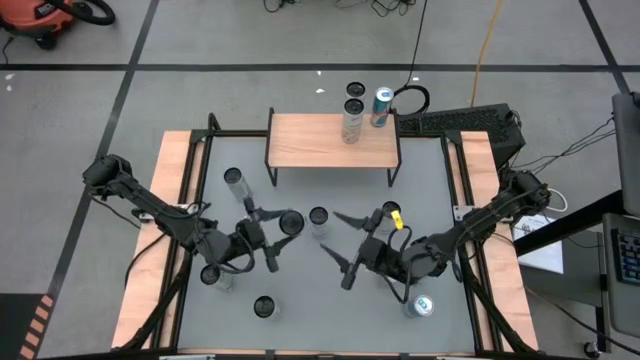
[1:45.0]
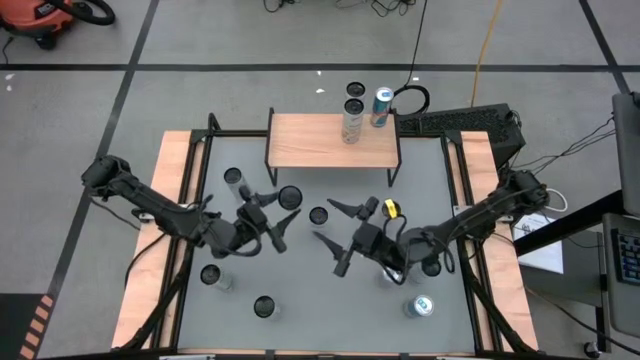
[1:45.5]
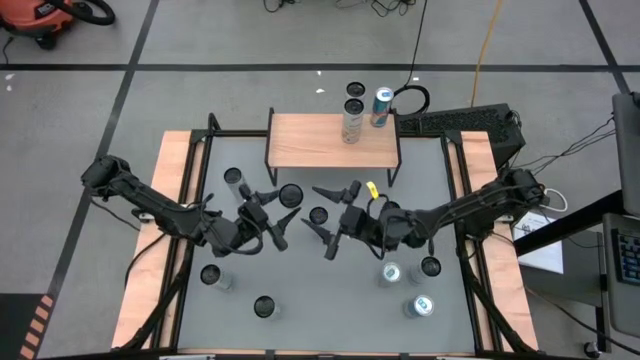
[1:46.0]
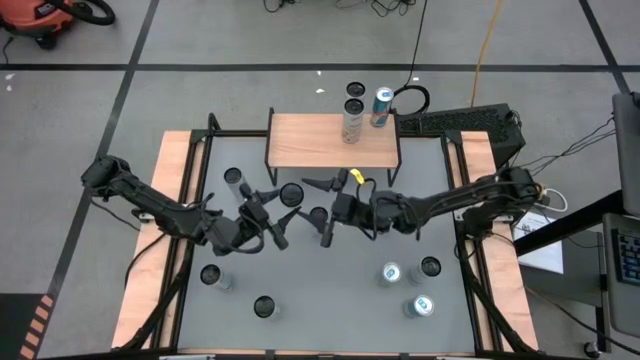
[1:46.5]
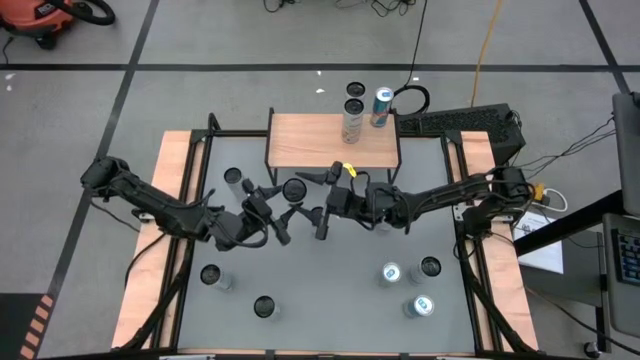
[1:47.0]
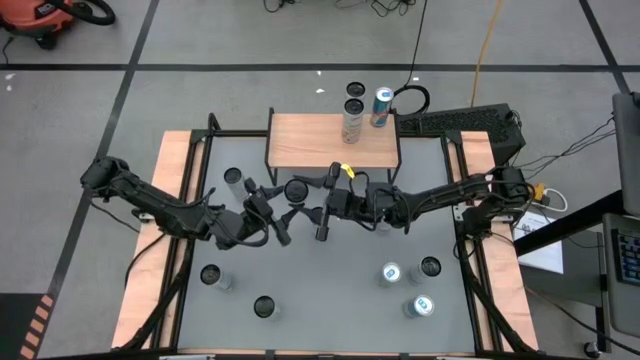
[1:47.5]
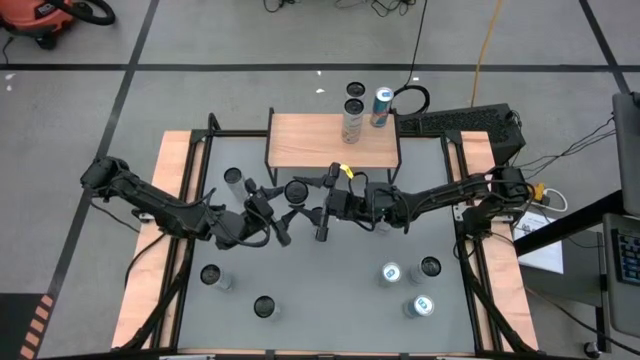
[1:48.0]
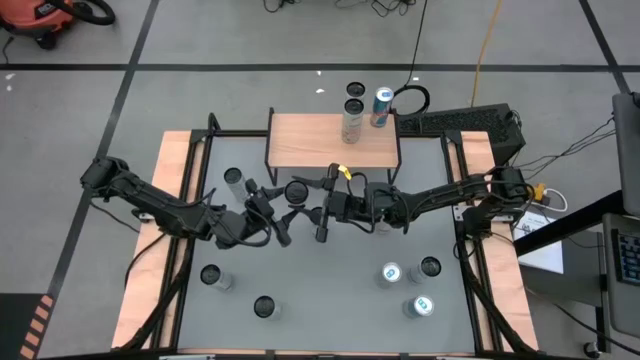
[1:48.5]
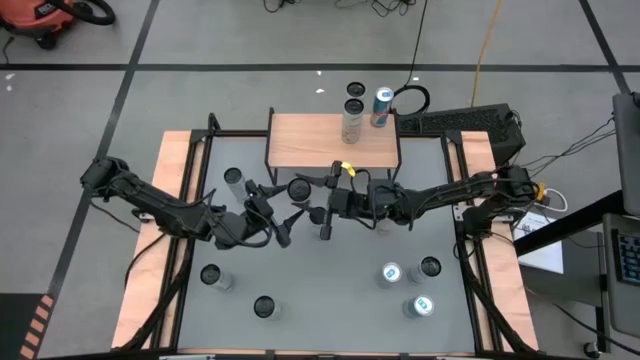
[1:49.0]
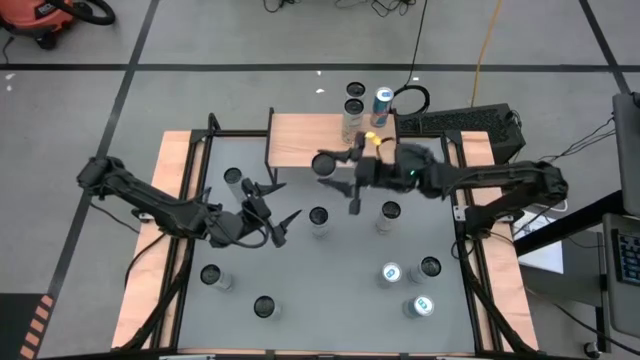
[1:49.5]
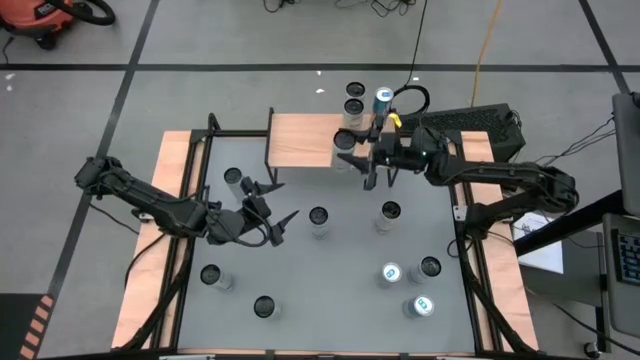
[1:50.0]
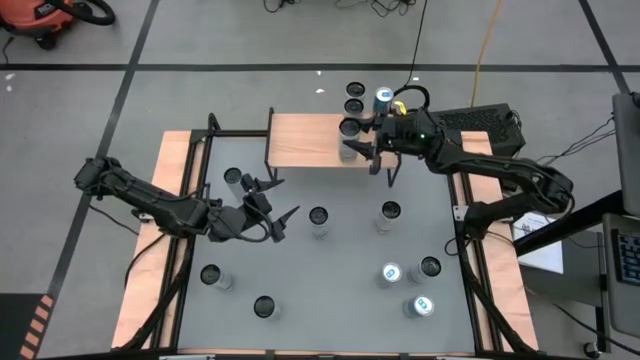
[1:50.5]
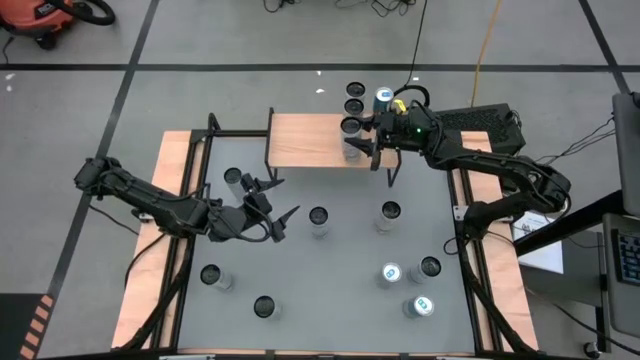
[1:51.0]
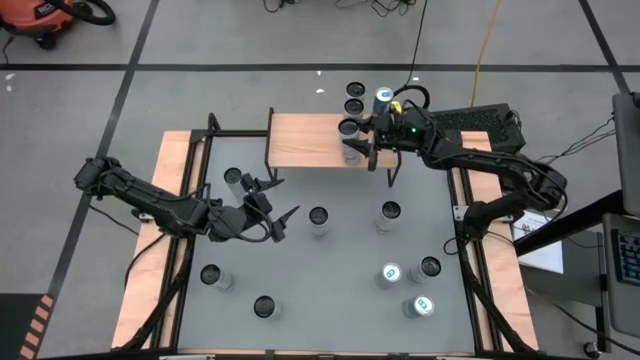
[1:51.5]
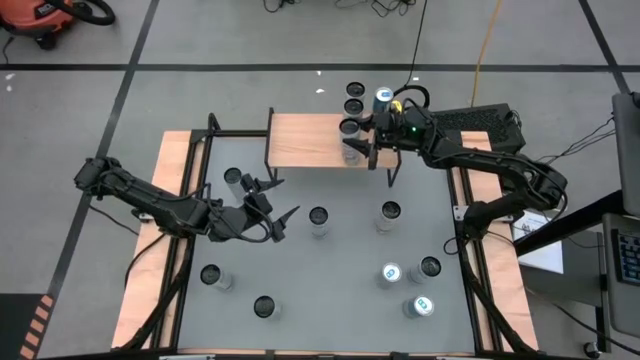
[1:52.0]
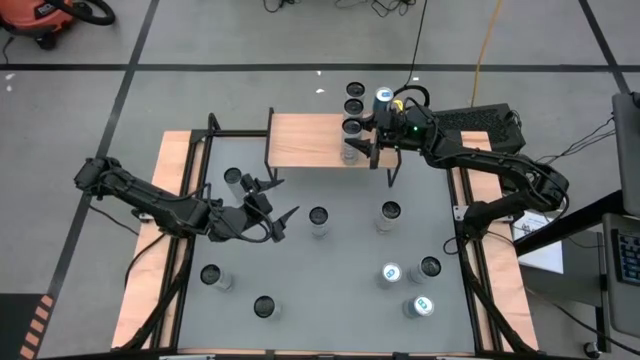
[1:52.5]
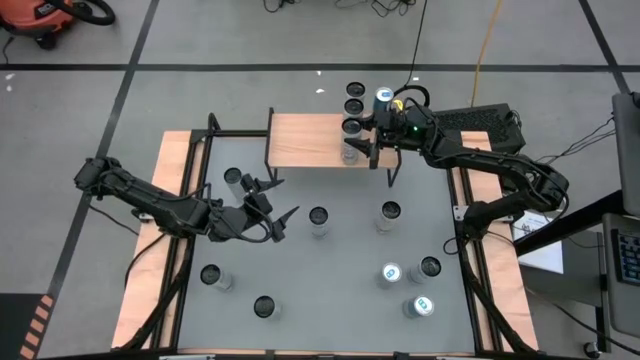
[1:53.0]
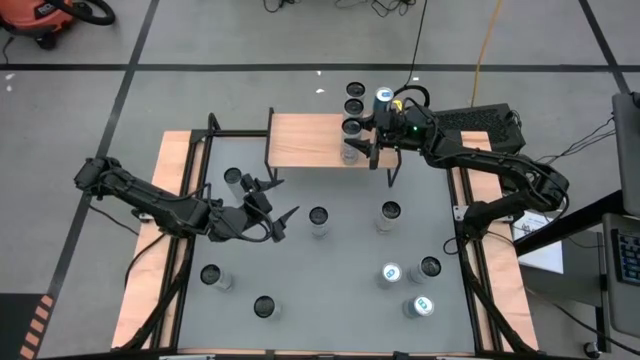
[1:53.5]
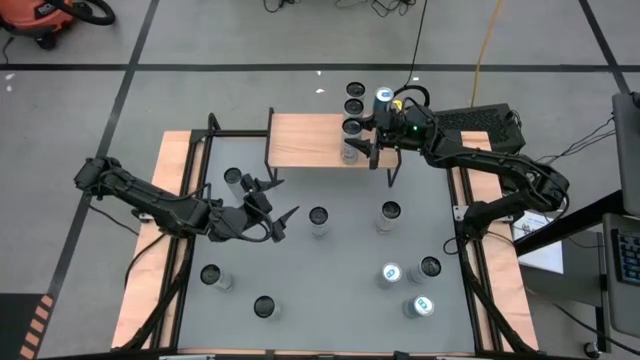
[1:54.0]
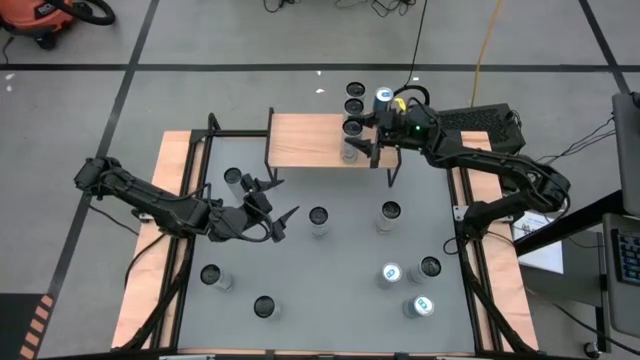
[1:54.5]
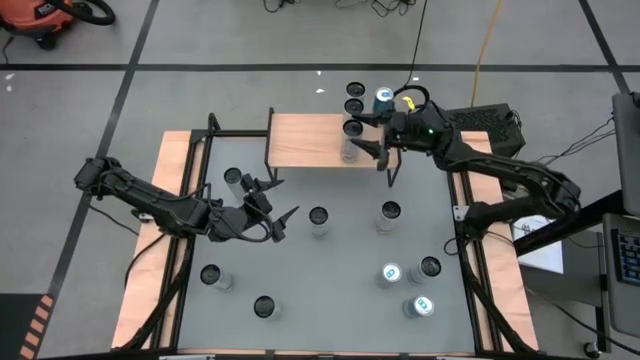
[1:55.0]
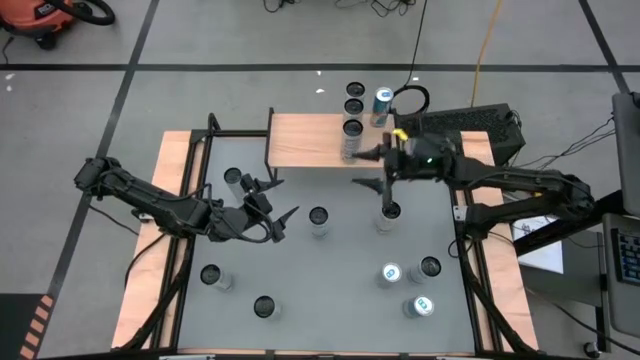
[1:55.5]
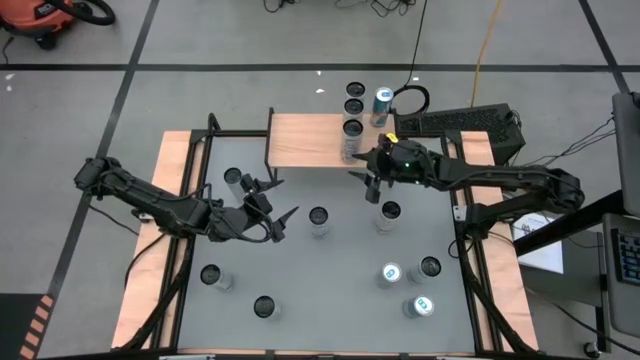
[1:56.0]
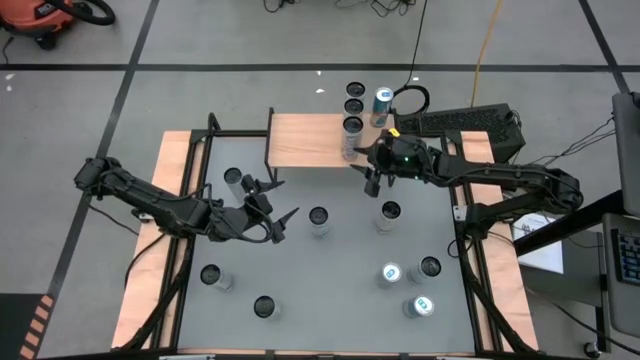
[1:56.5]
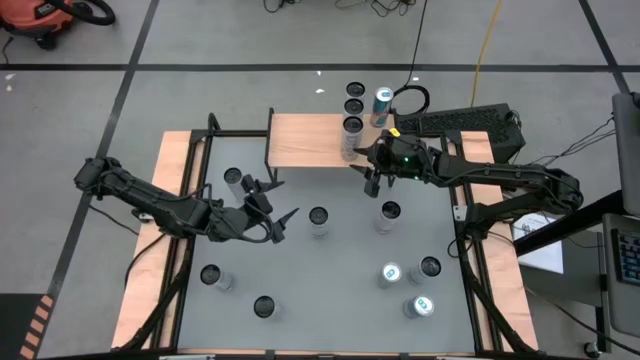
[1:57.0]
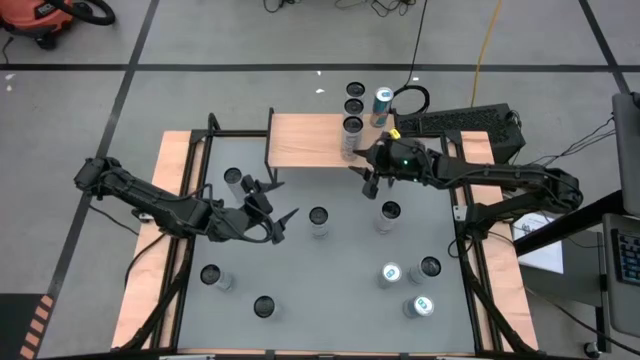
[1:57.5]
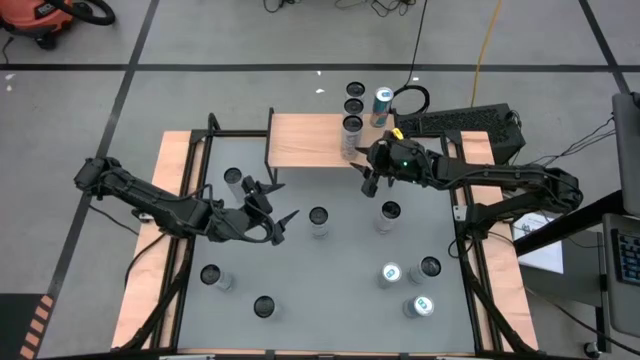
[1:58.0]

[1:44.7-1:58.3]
Task: Place canned beverage on shelf
Put the white yellow soda can on the shelf aligned with the other white yellow soda cans

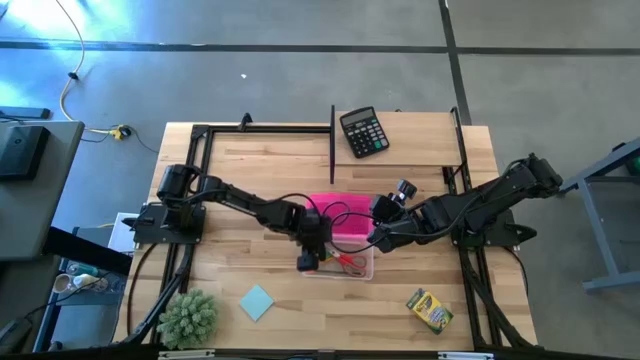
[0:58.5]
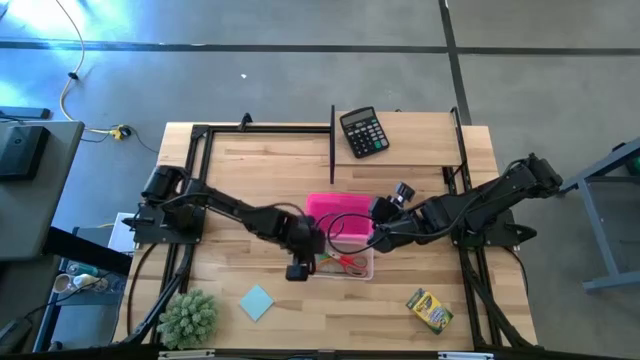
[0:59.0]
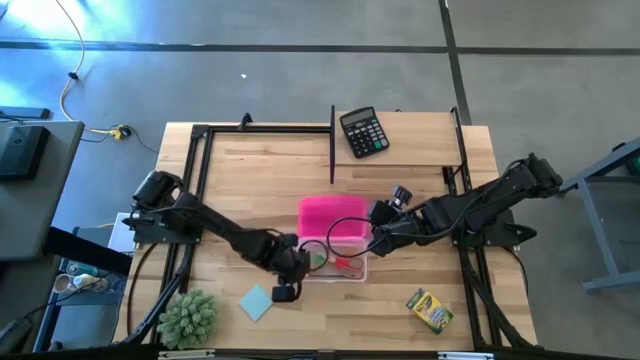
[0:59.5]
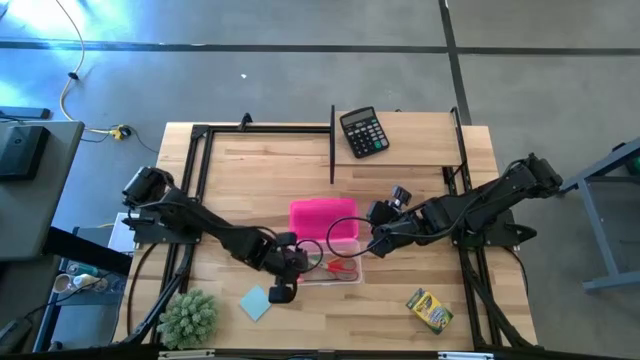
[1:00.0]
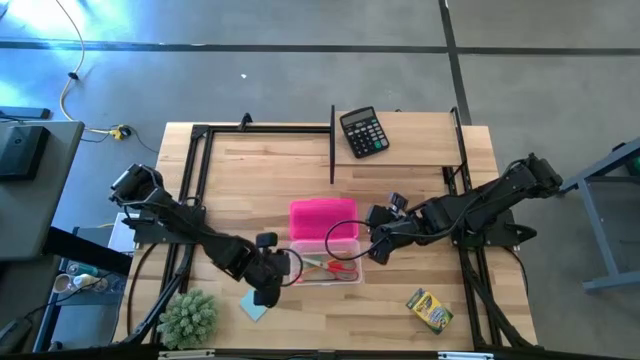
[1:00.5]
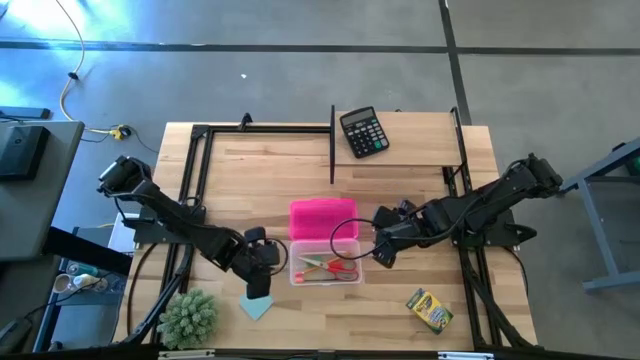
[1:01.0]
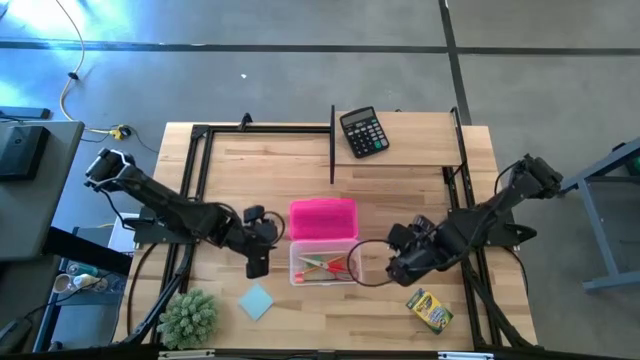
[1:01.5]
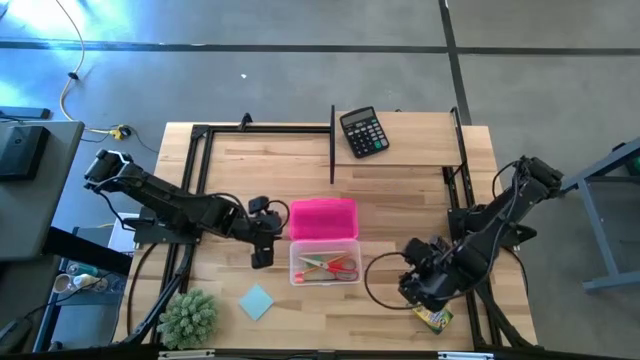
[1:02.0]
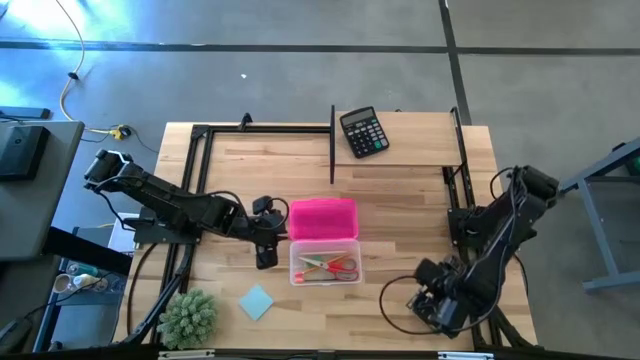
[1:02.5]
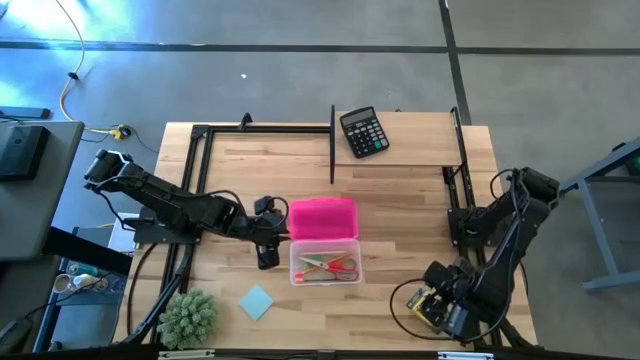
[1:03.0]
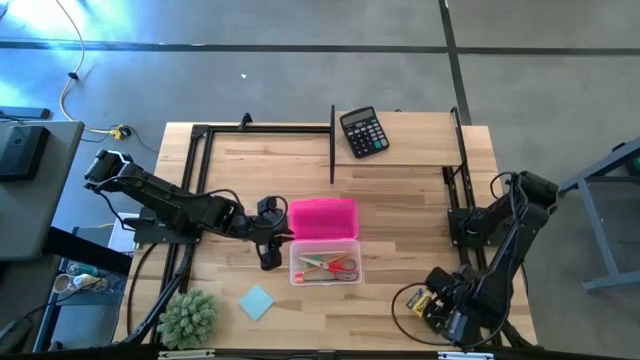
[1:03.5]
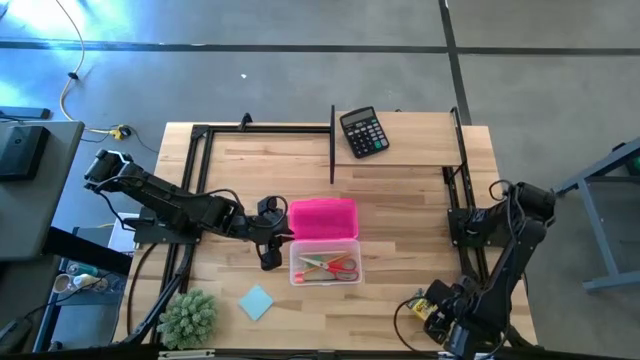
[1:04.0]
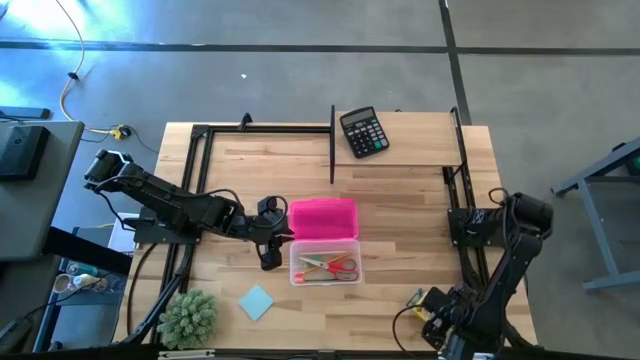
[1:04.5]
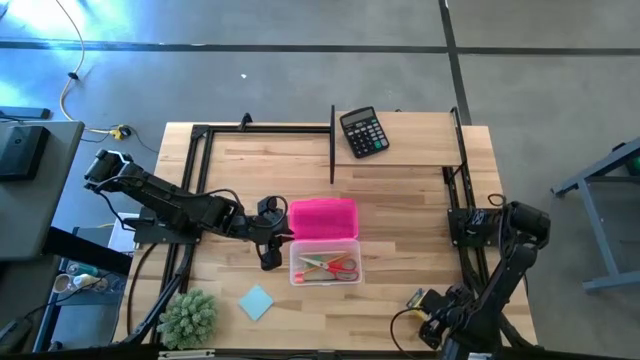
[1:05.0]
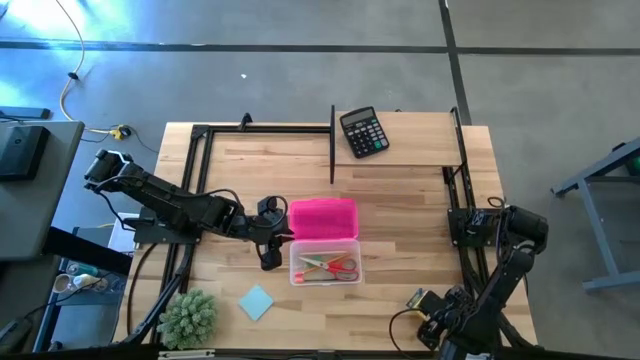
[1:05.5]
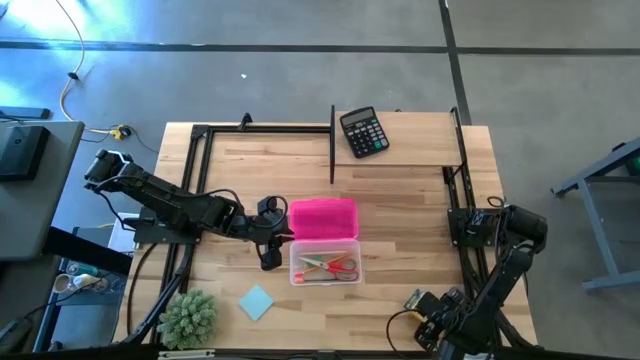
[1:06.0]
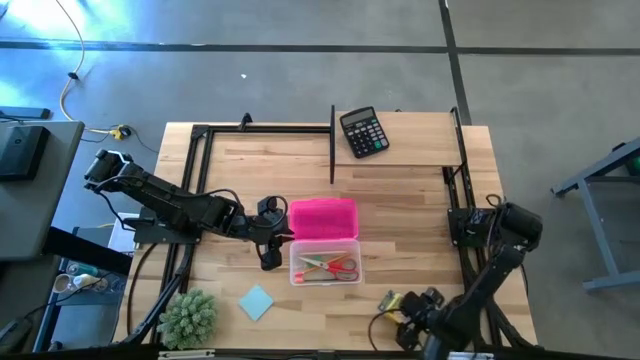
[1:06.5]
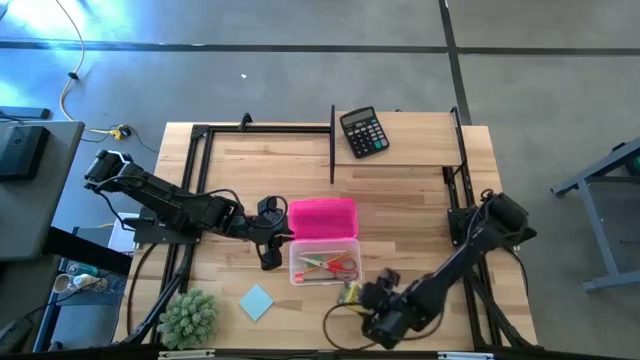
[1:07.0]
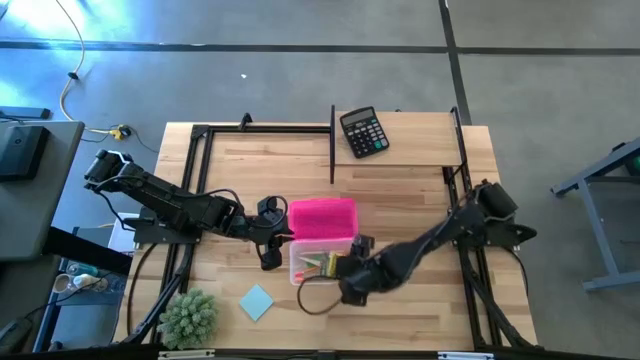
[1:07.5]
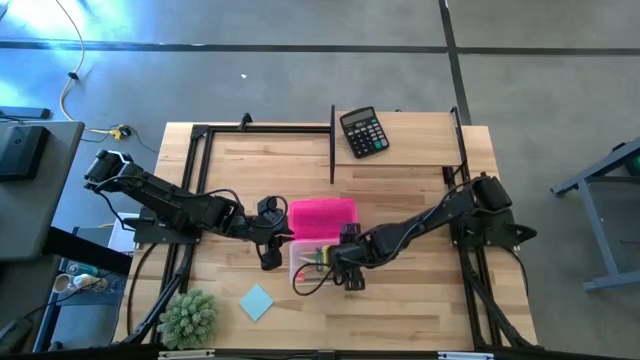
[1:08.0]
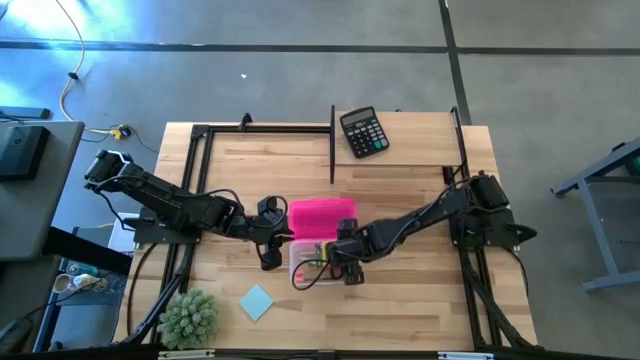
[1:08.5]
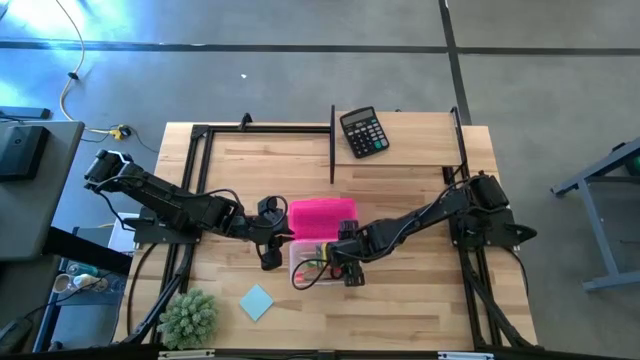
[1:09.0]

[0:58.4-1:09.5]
Task: Pack school essentials
Put the yellow crayon pack into the supply box
